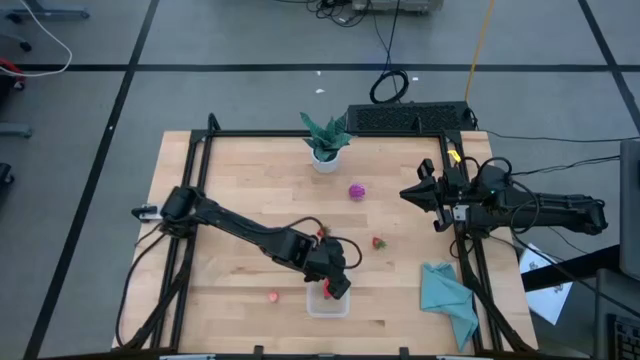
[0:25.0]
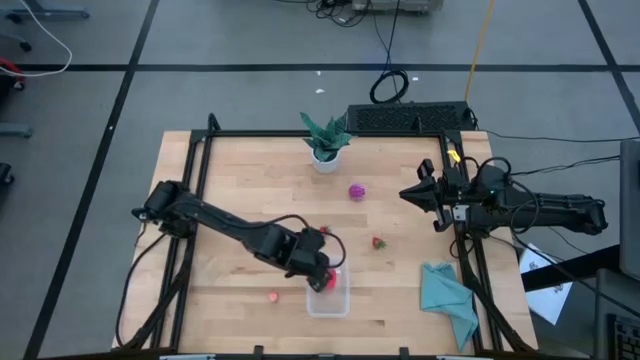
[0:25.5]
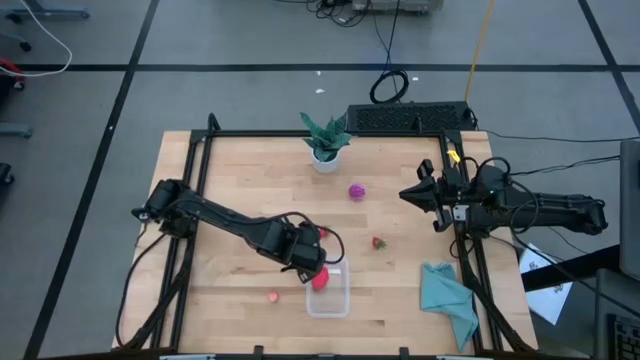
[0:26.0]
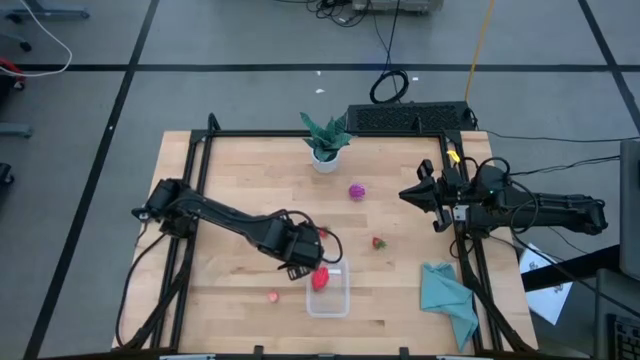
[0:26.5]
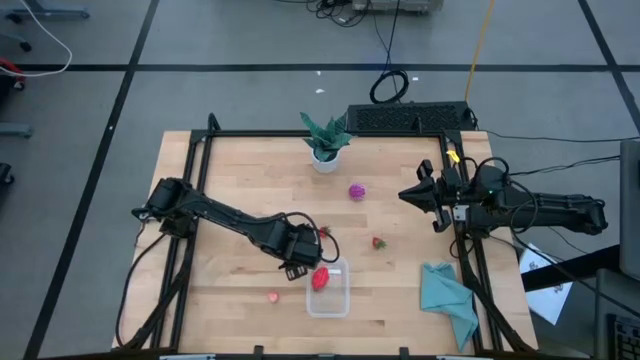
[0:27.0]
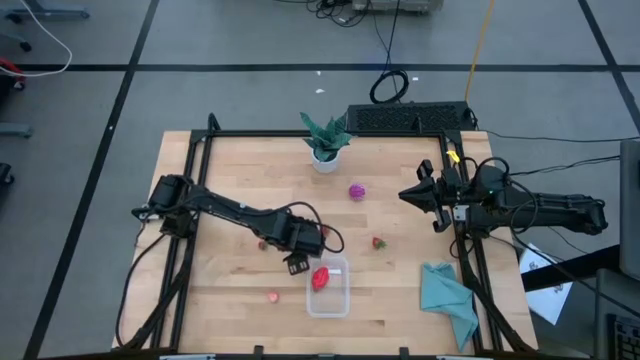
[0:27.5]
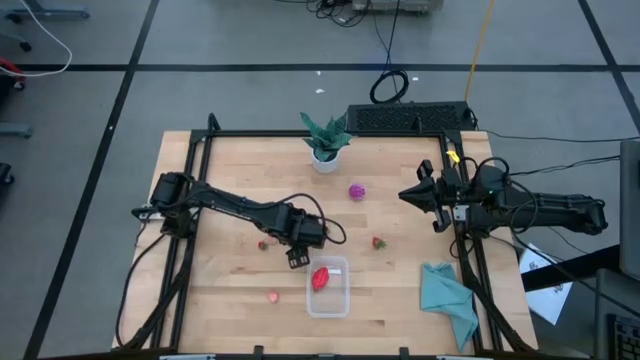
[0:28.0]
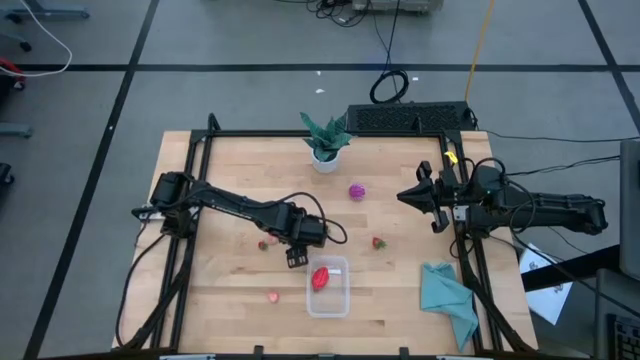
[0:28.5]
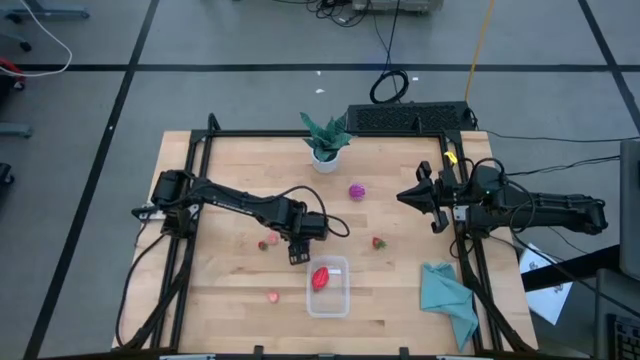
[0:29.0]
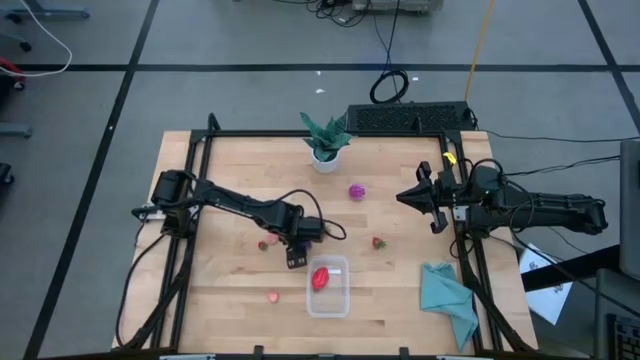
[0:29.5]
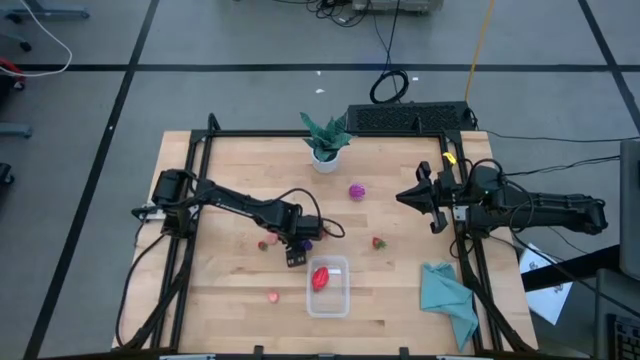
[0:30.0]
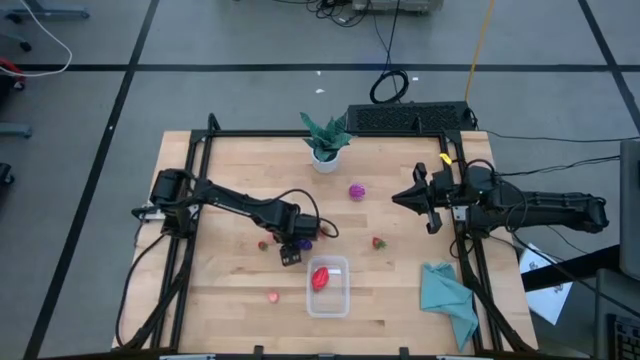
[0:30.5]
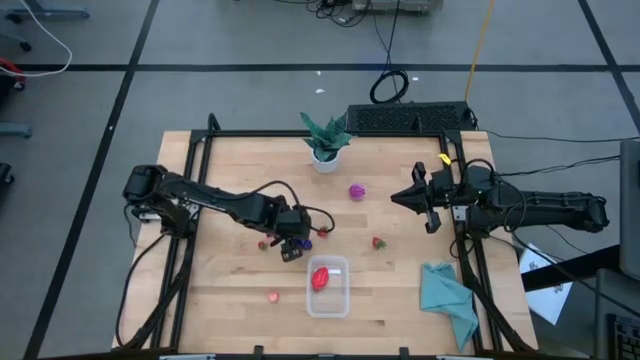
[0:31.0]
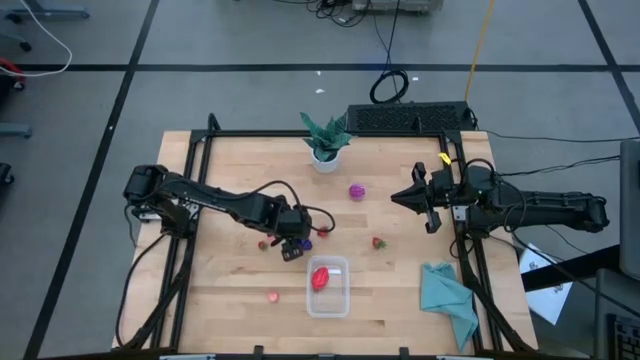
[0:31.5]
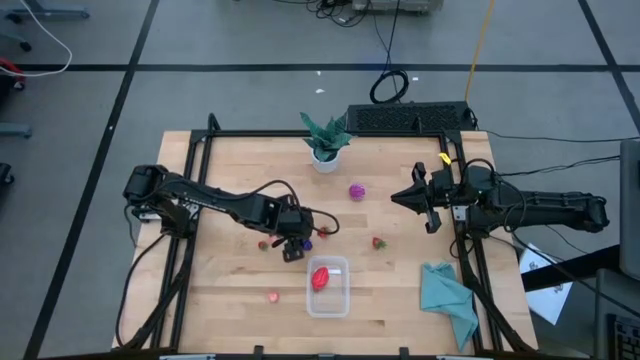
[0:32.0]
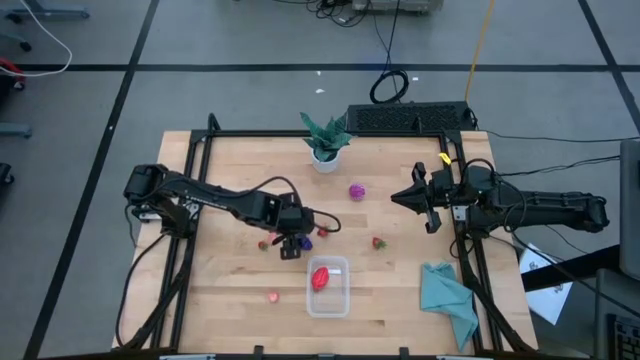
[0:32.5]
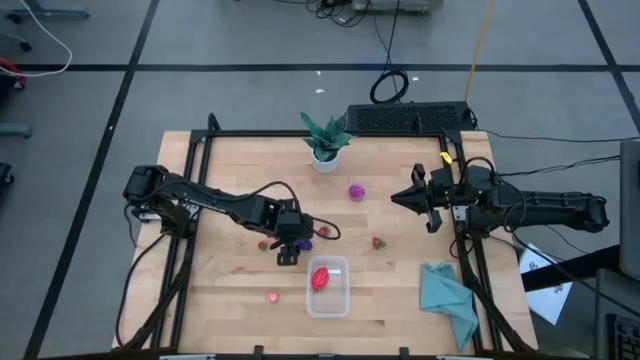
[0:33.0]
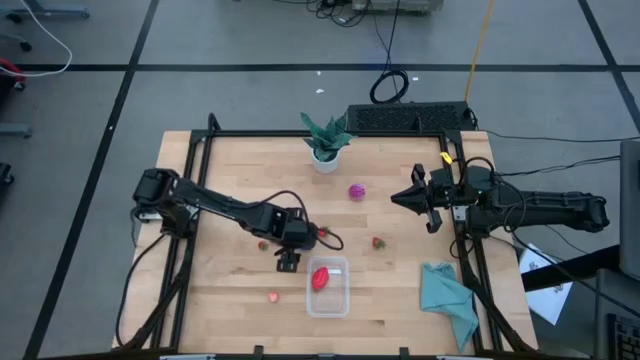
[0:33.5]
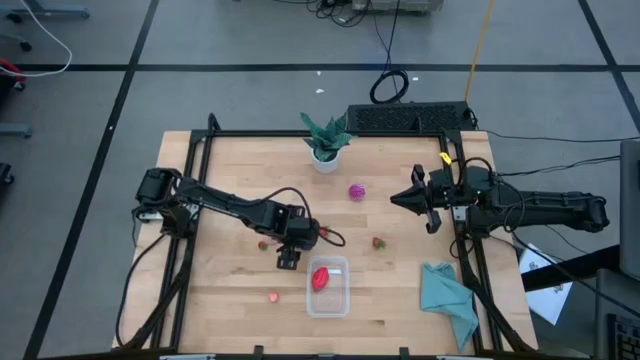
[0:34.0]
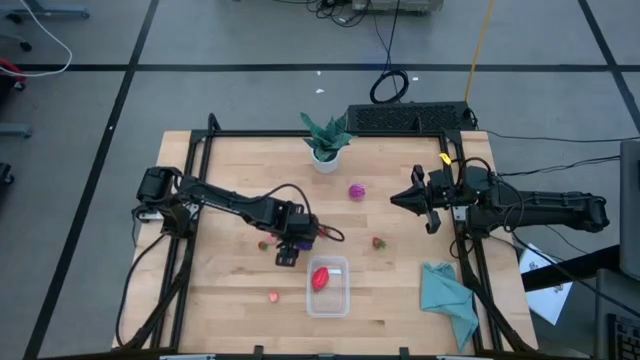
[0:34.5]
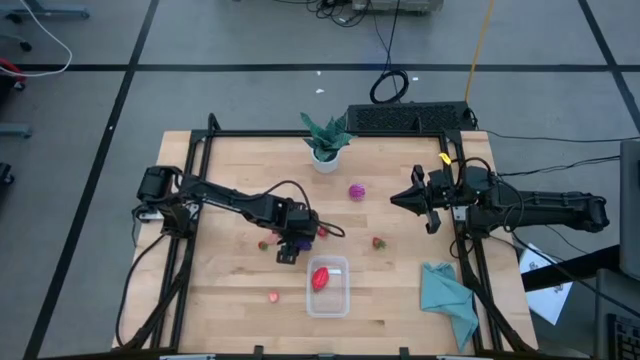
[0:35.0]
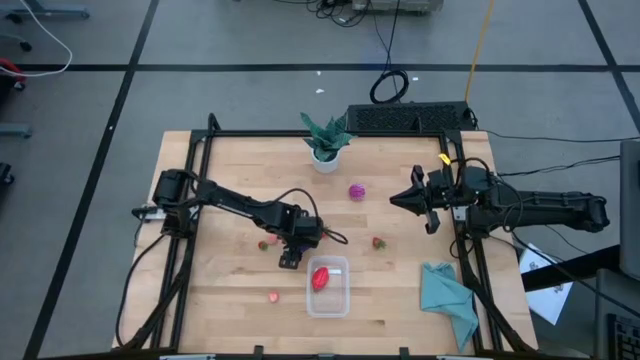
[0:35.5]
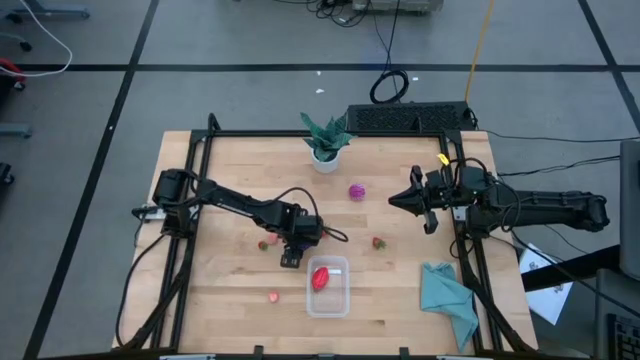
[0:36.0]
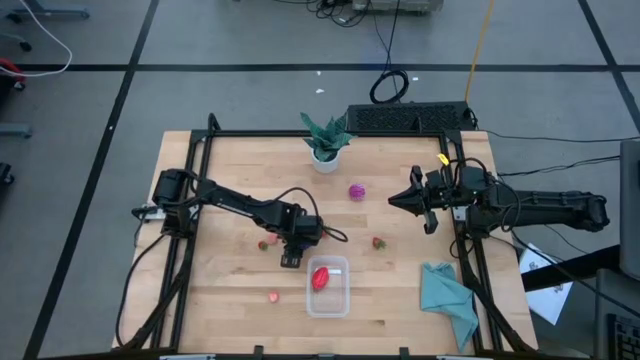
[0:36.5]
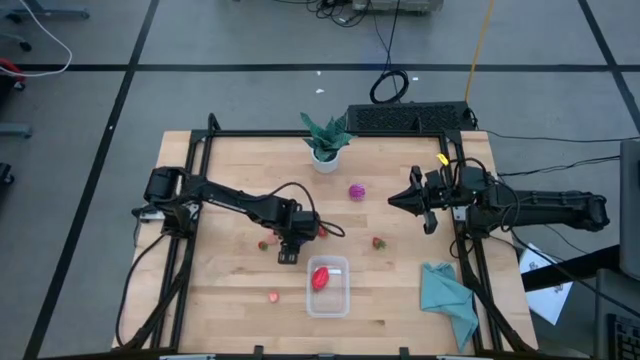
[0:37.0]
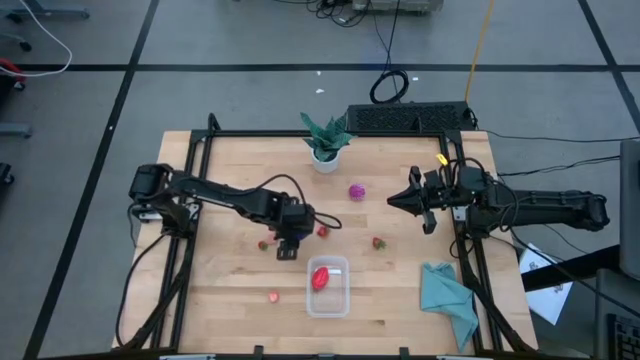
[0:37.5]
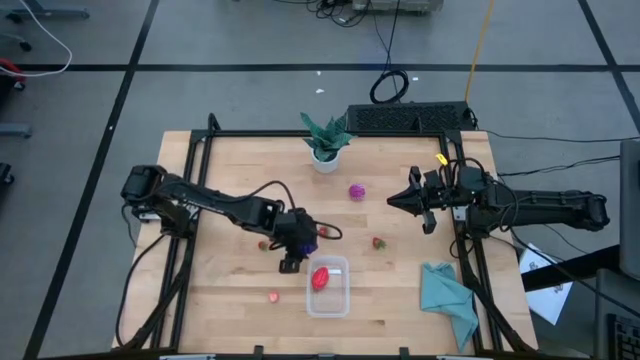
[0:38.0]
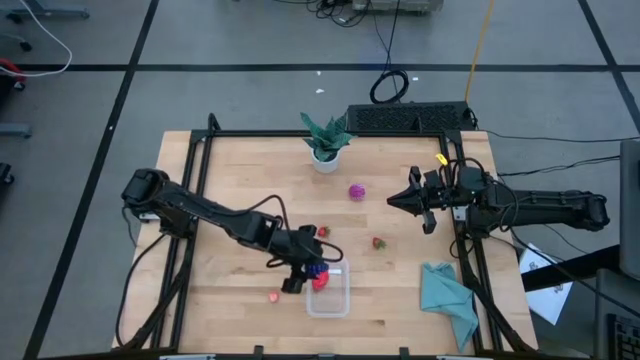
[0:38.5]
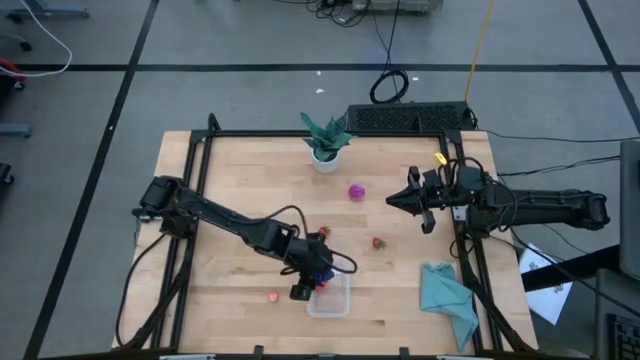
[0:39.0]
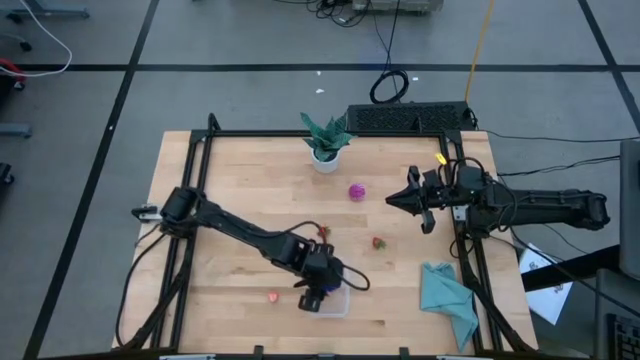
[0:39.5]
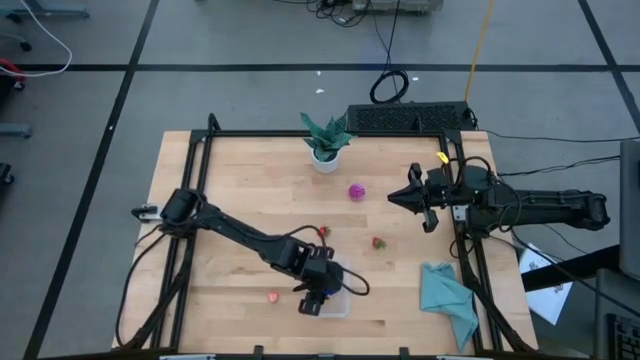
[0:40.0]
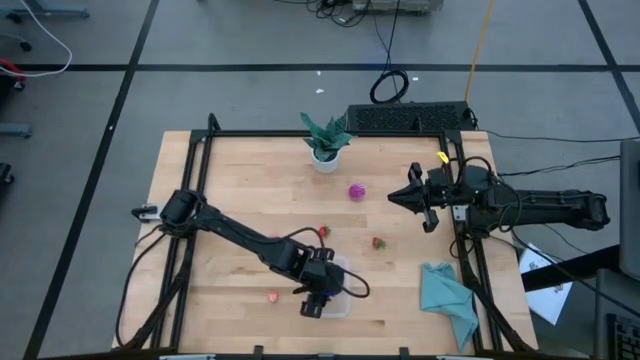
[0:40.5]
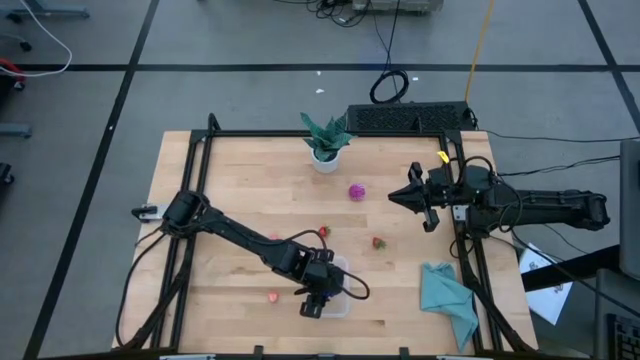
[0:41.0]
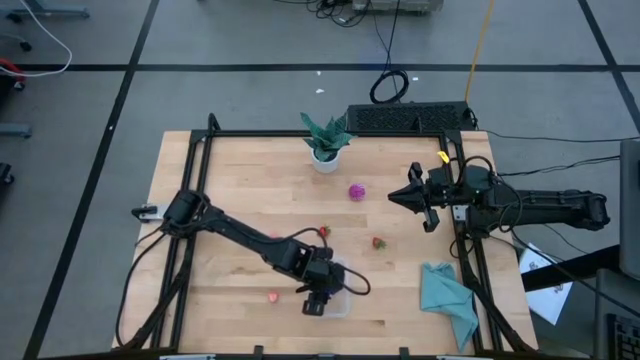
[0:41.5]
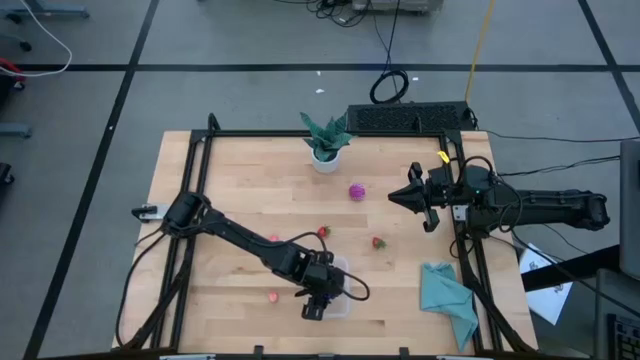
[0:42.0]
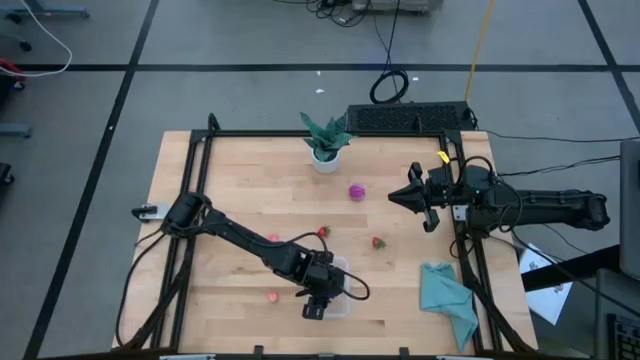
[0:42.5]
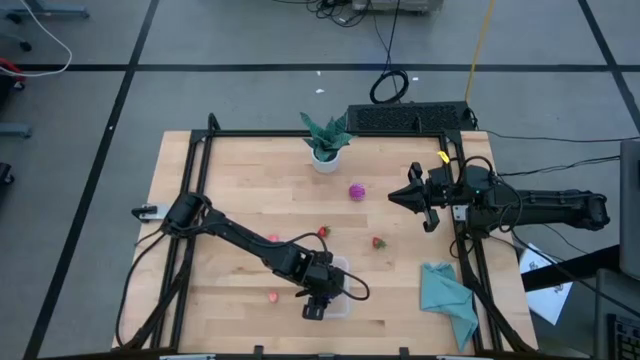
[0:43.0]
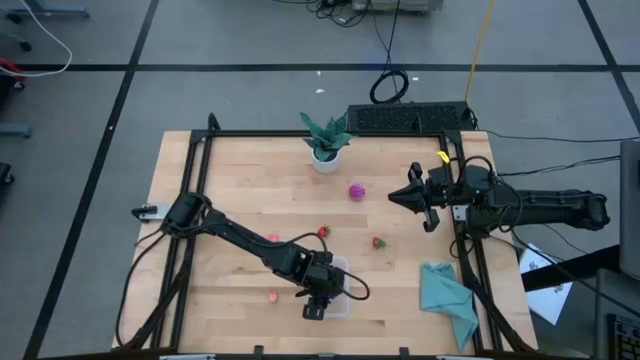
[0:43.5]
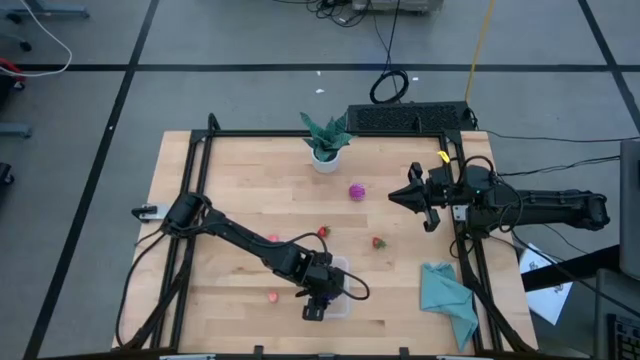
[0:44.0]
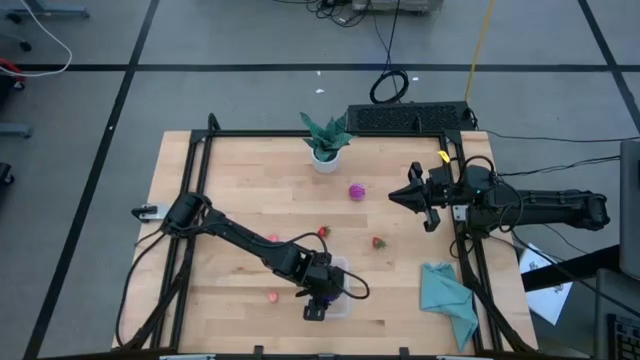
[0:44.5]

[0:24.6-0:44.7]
Task: Pick and placing Produce into tupperware
Put the purple grapes into the transparent container

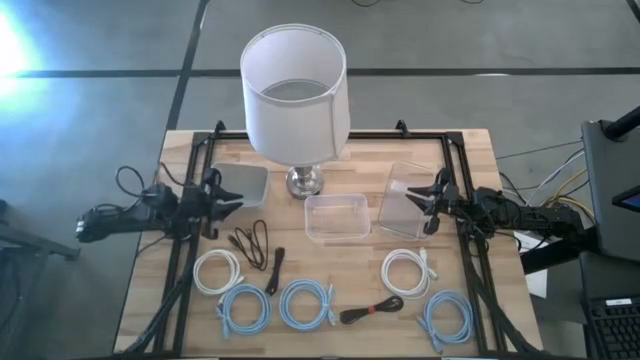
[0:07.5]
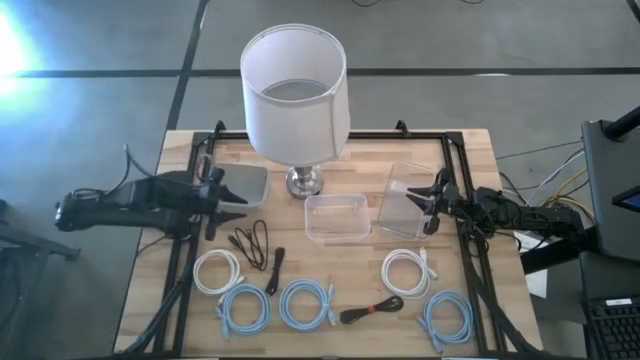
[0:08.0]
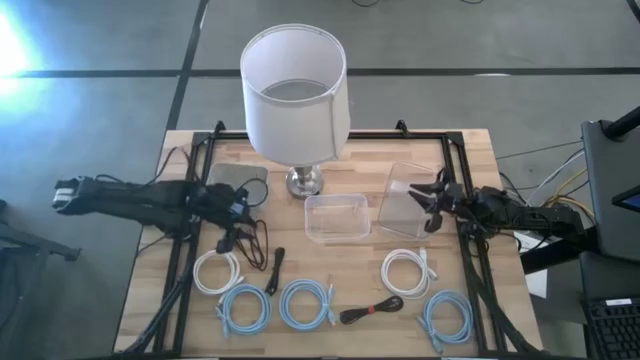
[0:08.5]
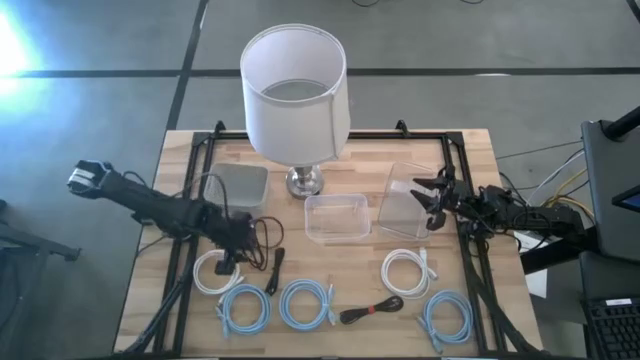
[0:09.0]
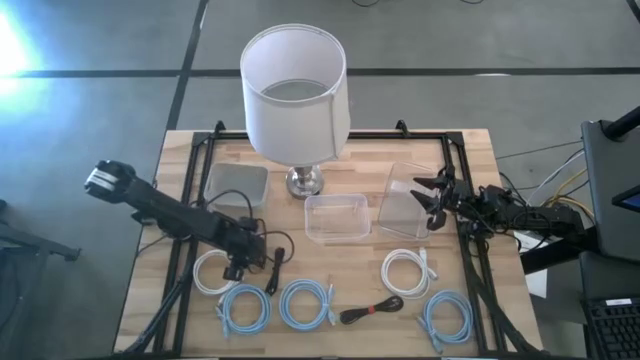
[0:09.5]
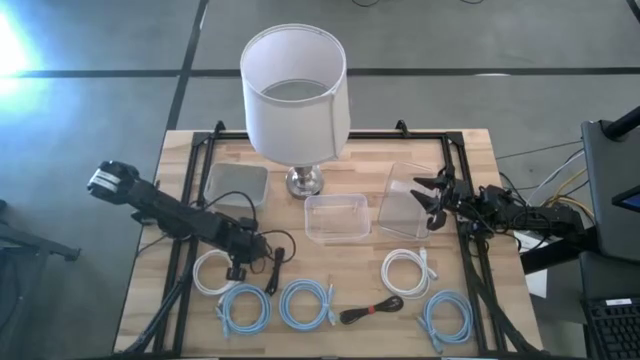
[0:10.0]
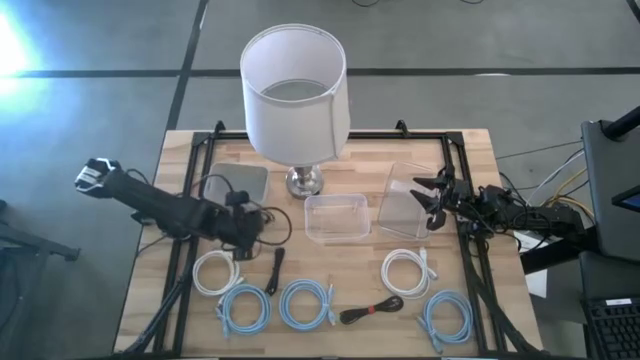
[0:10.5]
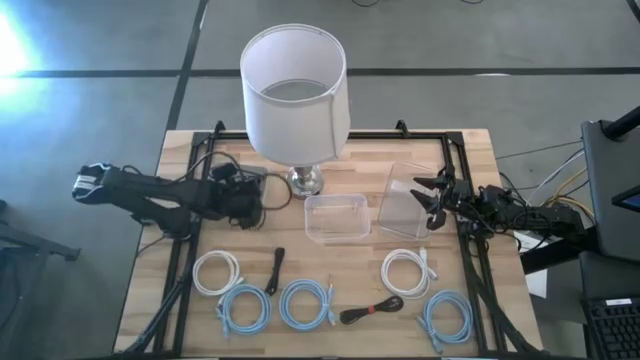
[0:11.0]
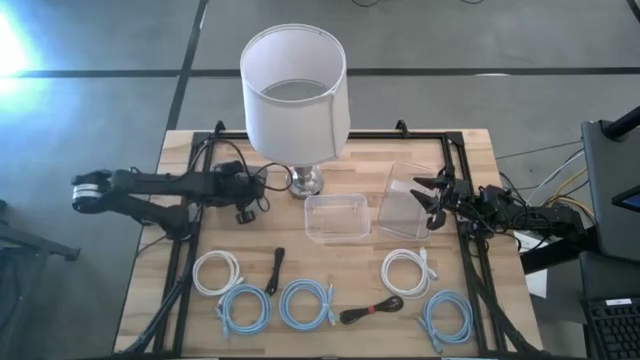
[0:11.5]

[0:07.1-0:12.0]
Task: Pick & Place USB Port
Put the top black USB cable into the gray bin
